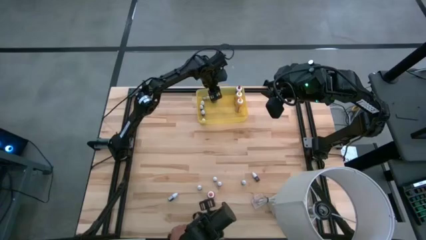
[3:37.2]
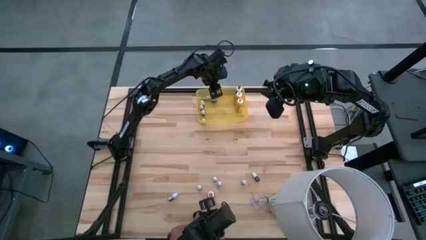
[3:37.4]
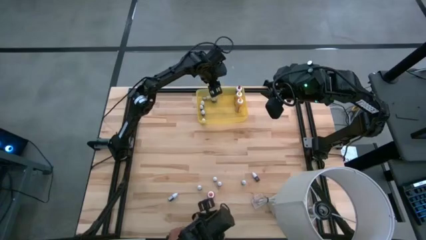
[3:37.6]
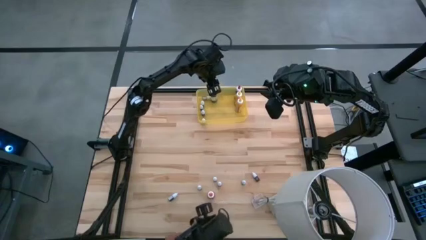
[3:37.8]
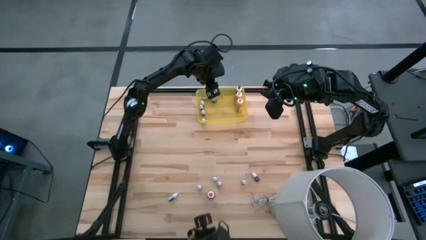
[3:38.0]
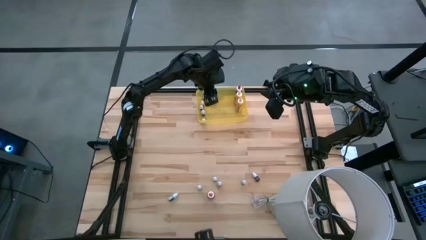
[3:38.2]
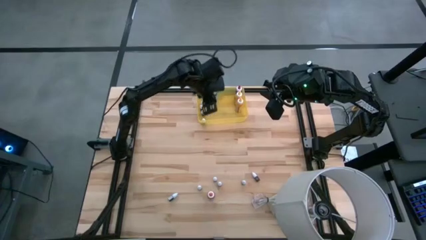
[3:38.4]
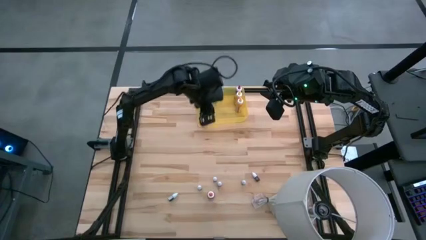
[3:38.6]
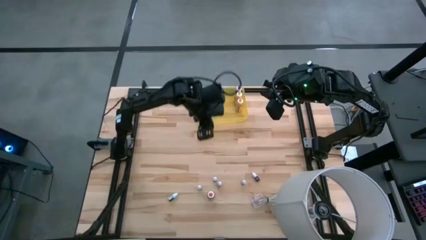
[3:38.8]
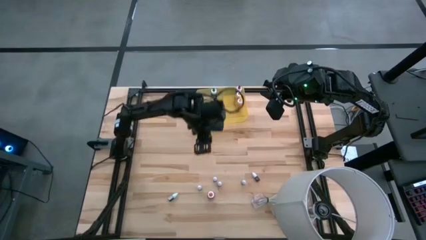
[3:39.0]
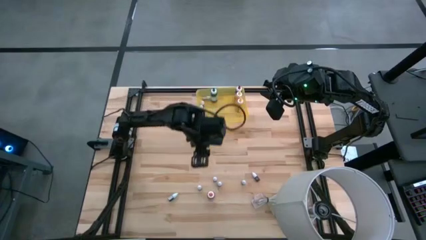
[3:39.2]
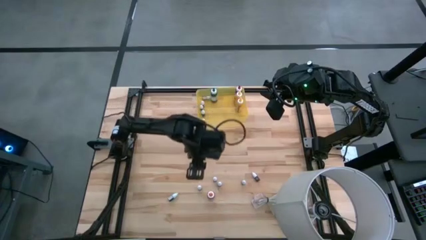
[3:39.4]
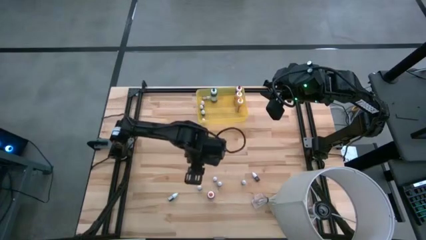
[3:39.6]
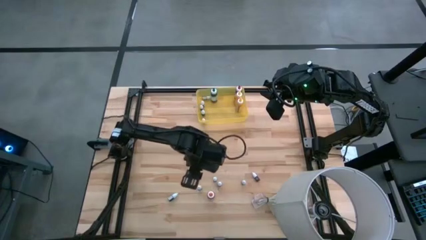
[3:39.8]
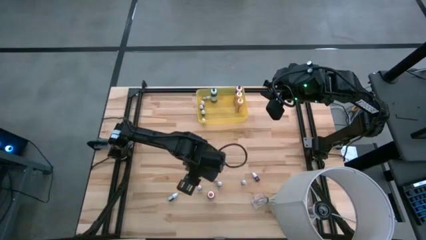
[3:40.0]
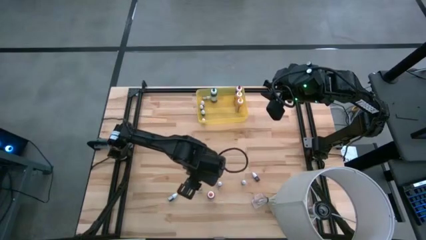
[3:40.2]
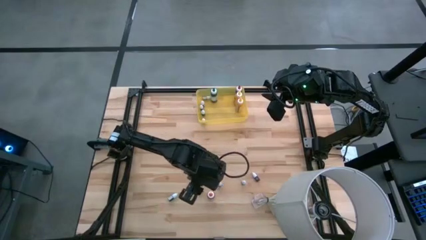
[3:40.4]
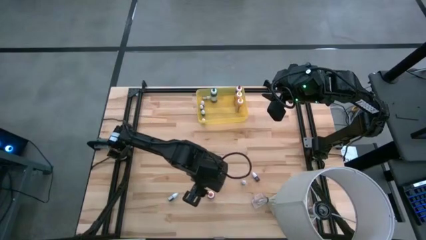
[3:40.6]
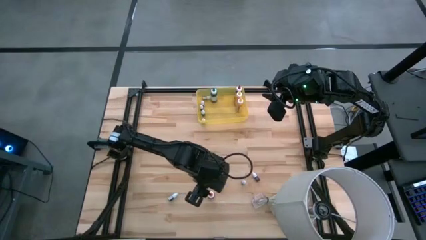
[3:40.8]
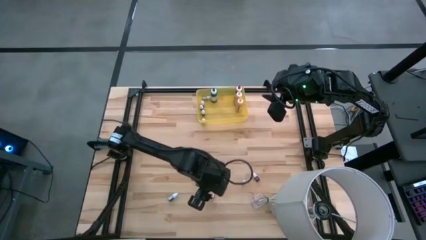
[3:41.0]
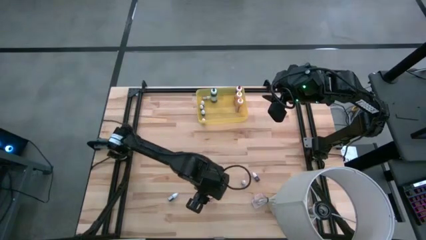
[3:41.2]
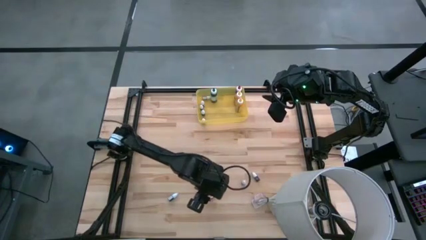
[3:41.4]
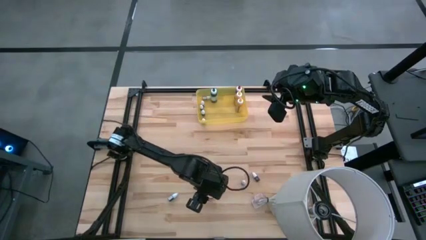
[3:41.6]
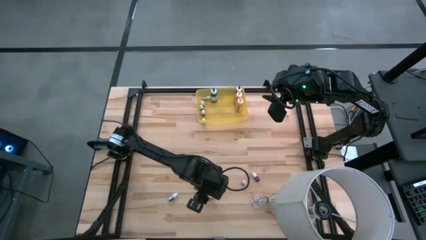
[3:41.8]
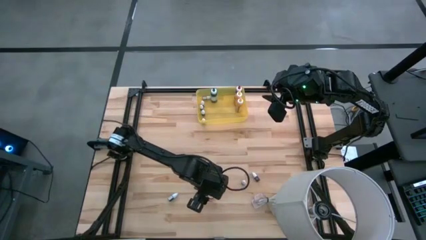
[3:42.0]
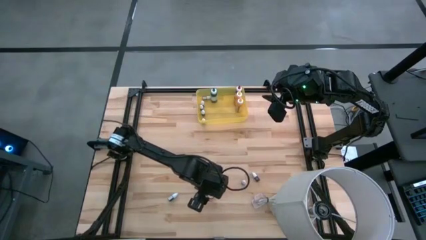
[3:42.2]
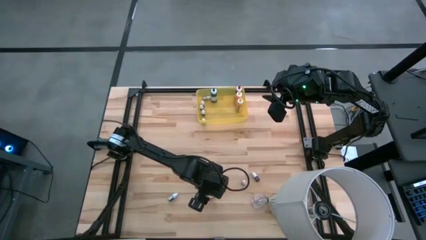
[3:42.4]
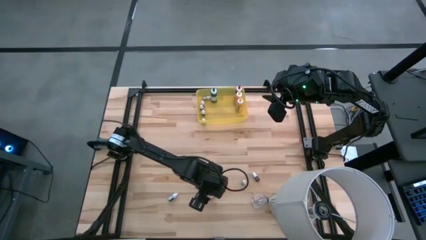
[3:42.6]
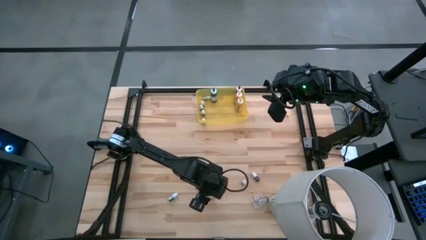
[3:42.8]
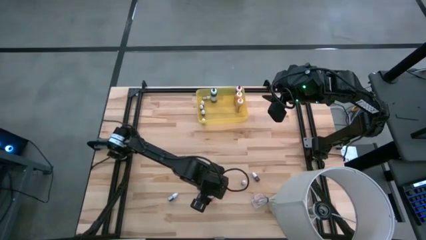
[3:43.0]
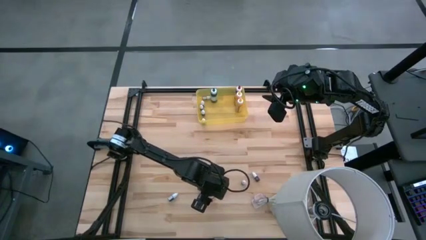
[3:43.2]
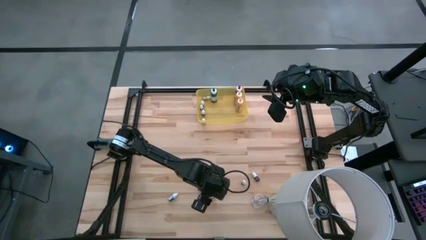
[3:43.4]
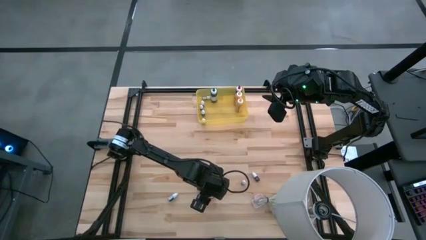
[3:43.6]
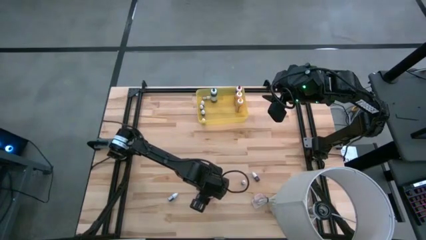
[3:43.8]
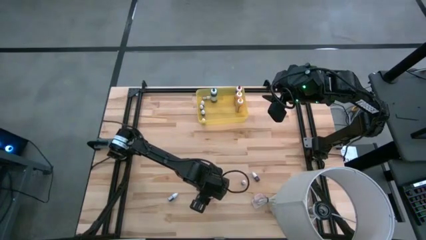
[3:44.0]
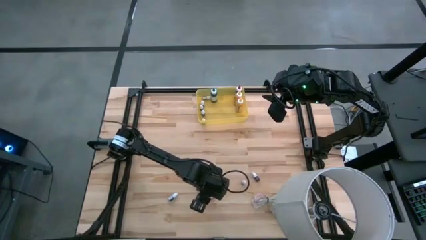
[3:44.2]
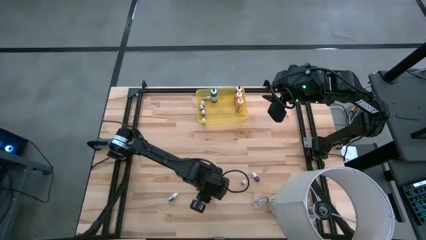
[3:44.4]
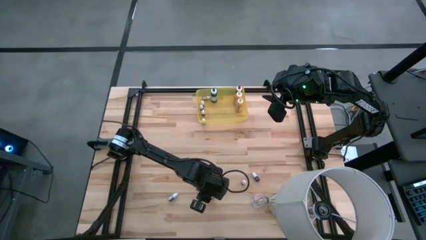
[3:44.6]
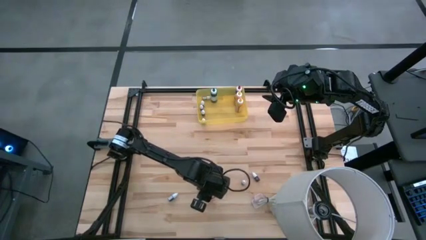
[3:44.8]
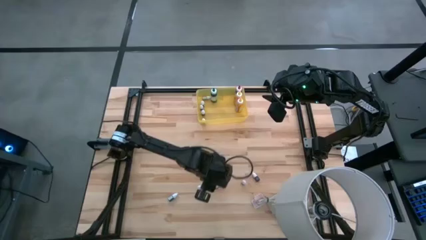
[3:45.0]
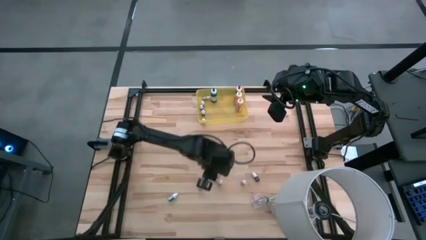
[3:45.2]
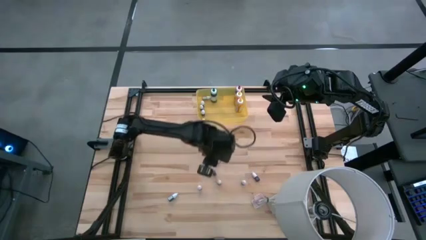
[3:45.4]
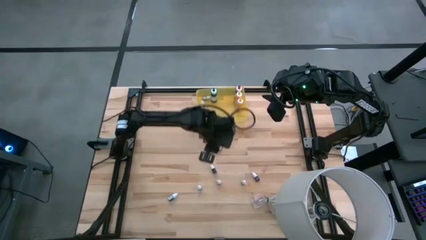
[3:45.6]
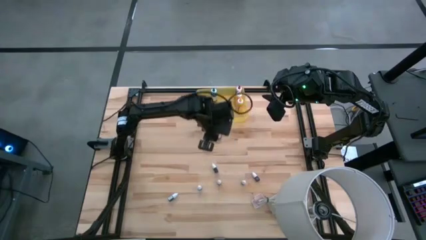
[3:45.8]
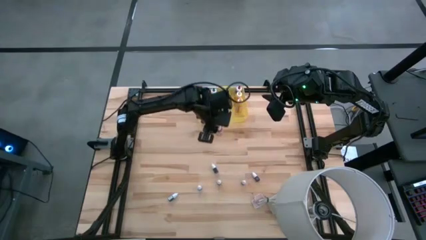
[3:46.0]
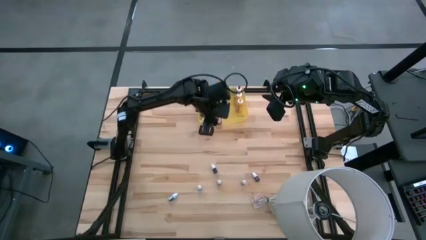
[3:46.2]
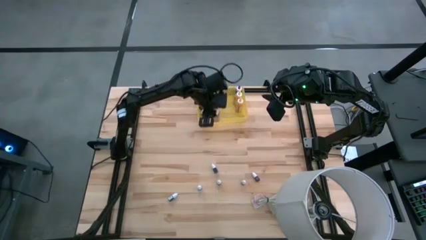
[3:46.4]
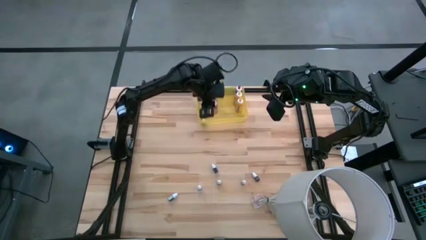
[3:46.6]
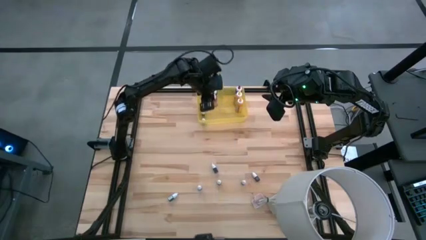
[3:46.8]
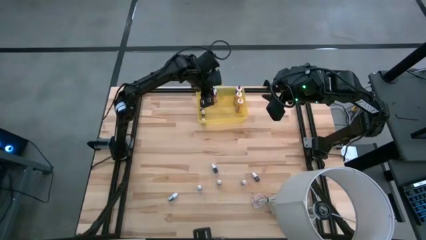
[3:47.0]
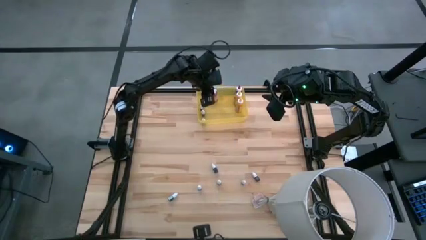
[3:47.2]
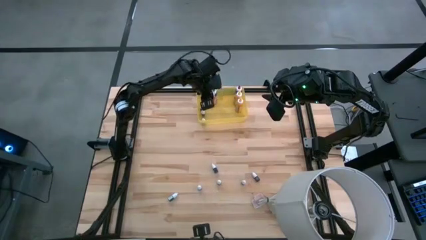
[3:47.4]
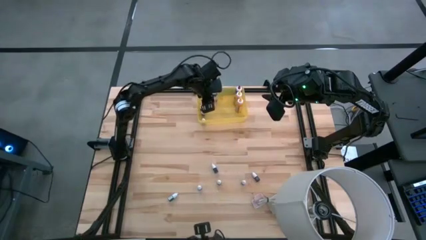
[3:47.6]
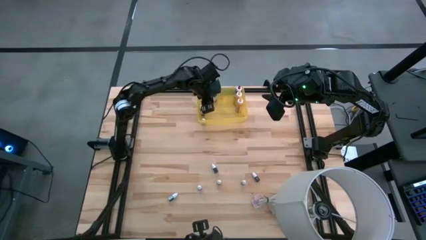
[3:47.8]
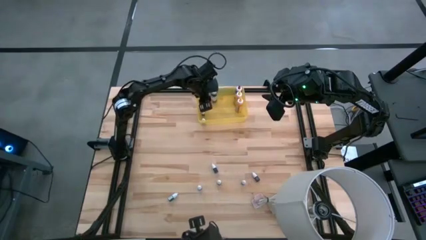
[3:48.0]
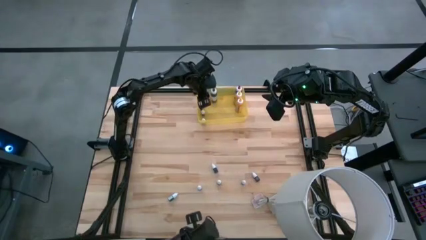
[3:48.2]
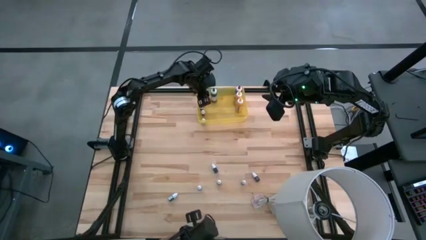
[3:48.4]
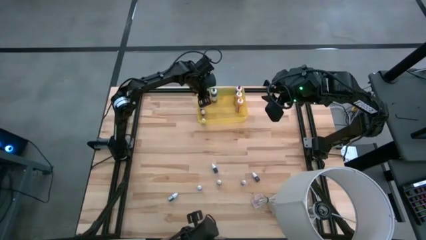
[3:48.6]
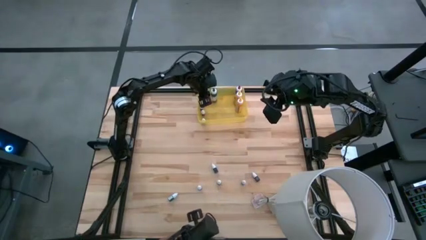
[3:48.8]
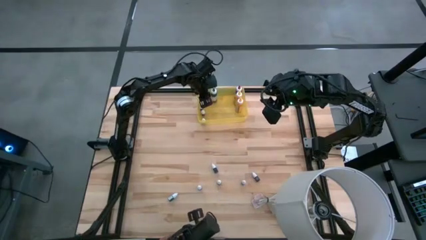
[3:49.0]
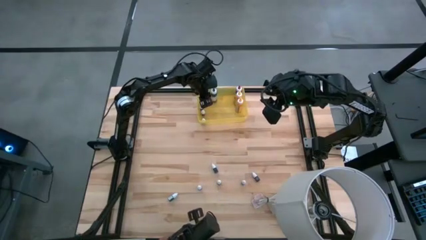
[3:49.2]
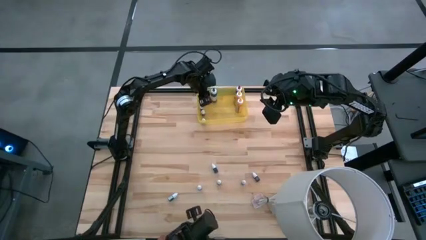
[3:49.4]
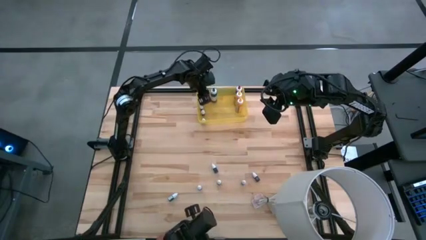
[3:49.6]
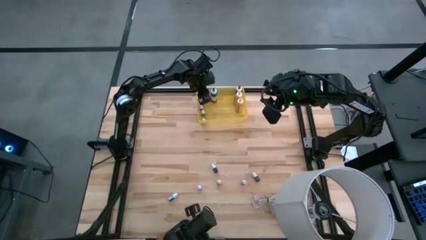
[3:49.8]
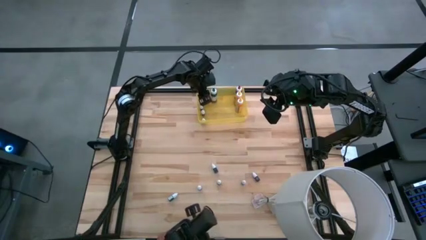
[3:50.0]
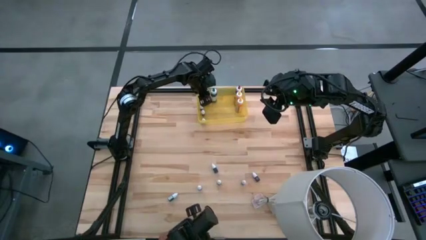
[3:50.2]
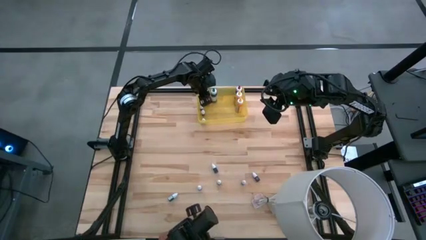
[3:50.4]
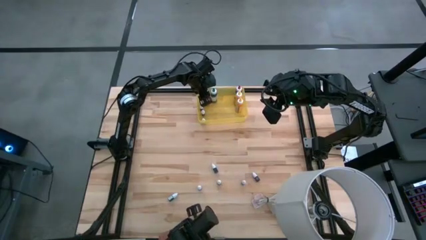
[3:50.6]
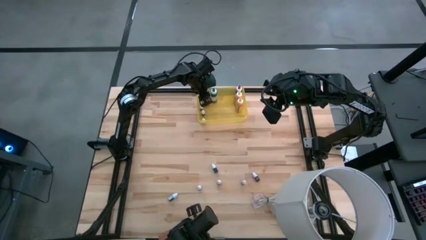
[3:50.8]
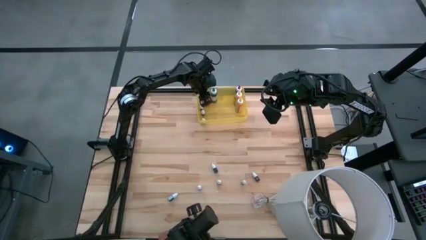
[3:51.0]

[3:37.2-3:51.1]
Task: Pick & Place food coloring
Put the large orange food coloring bottle into the yellow bin
